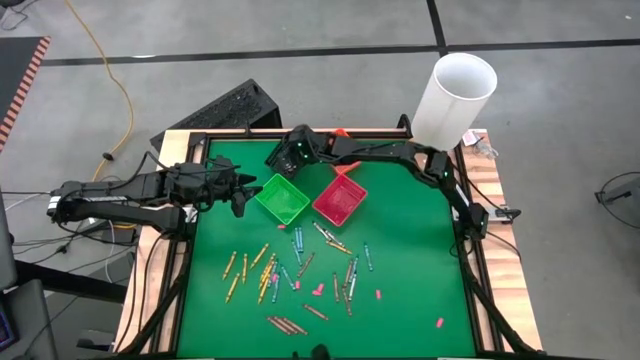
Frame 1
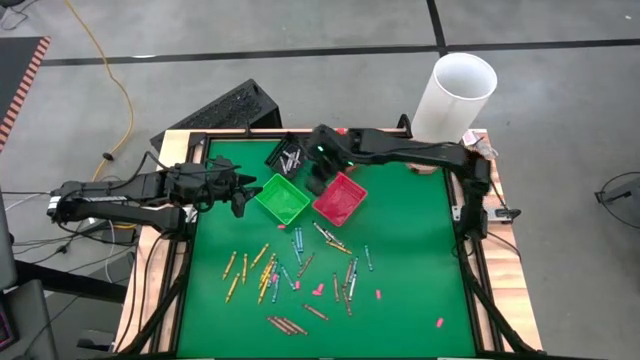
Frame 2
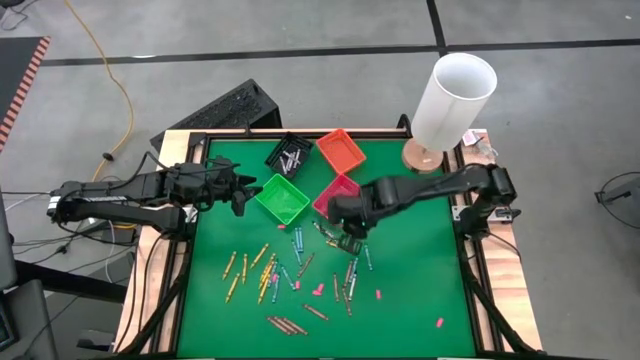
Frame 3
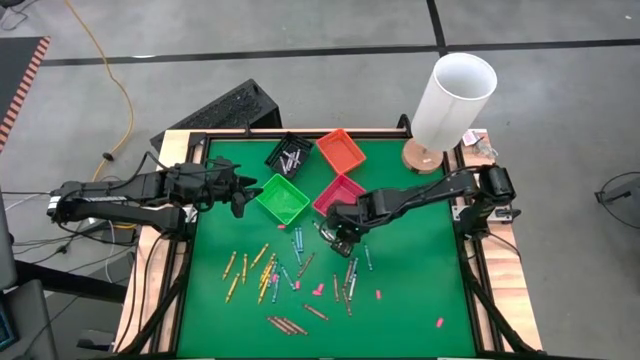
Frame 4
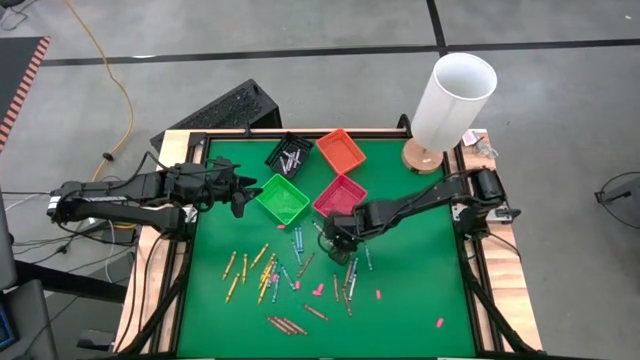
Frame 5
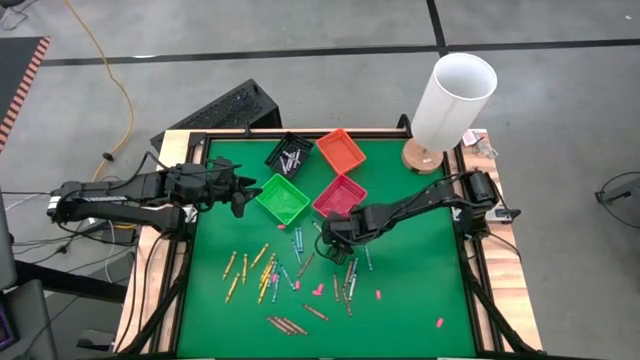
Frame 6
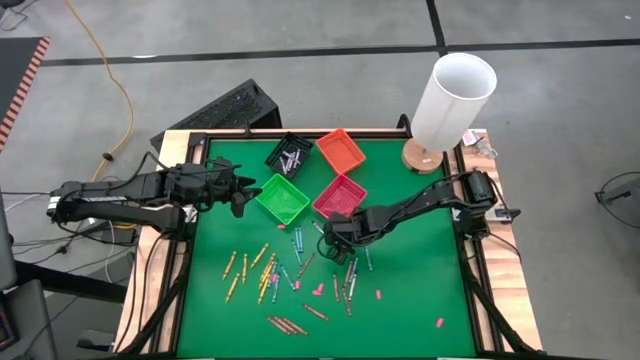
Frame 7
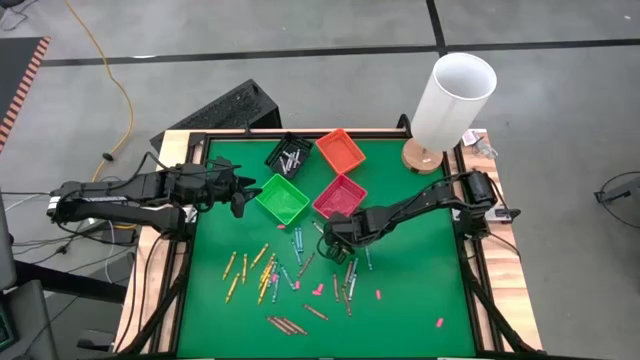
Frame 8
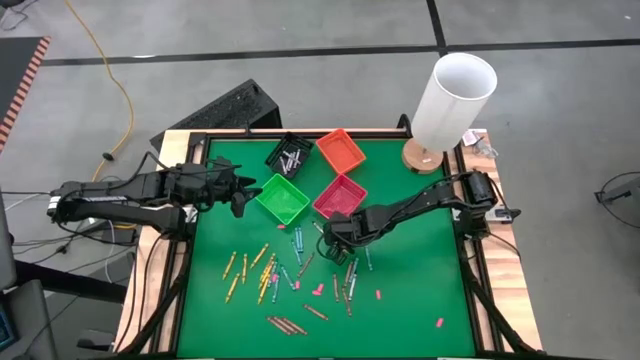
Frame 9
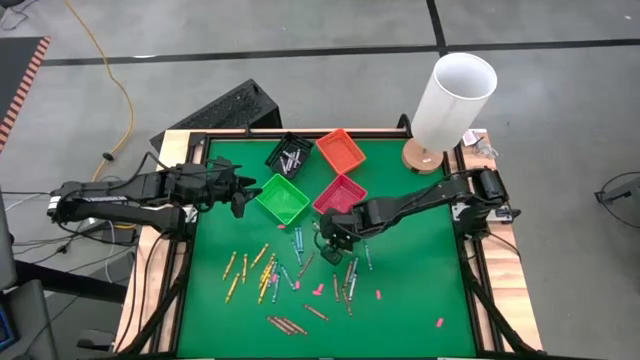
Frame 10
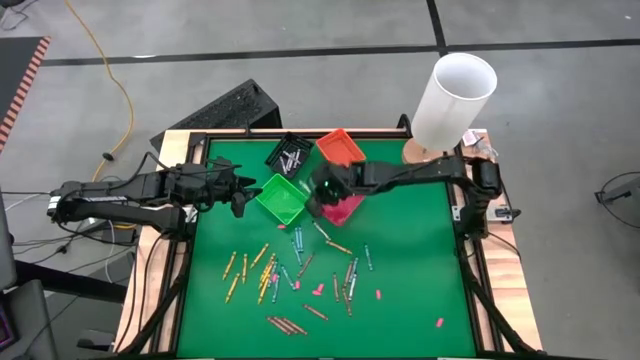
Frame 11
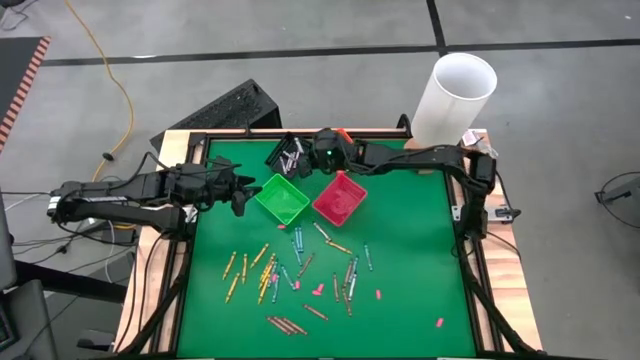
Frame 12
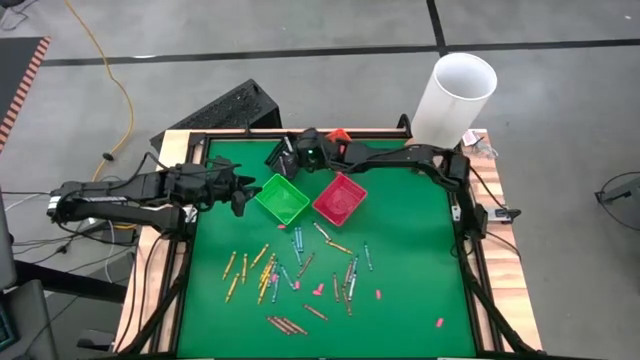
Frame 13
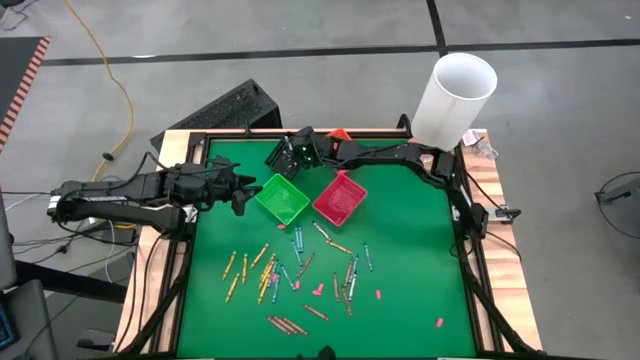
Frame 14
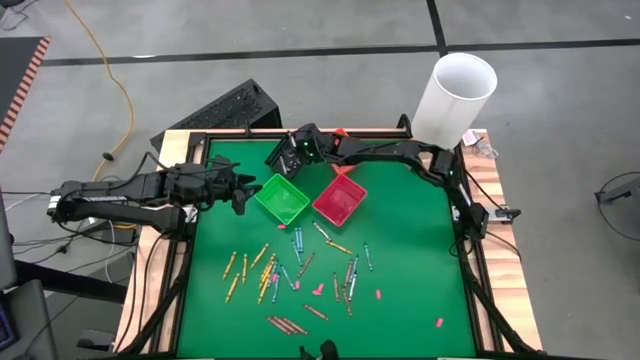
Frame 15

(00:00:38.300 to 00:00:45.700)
Task: Sort crayons
Put the black crayon into the black bin

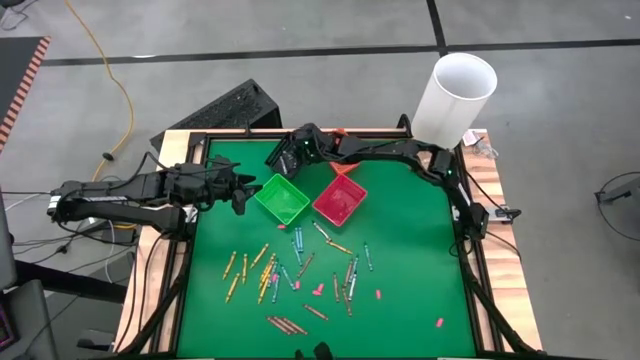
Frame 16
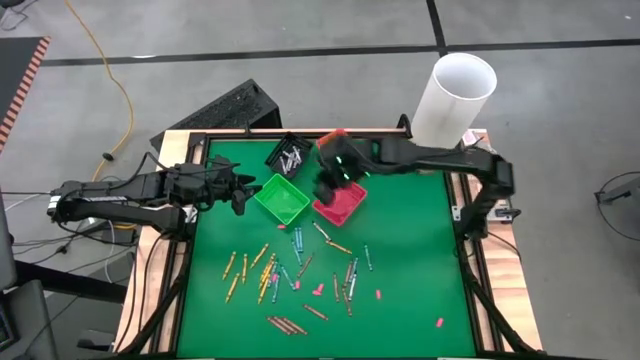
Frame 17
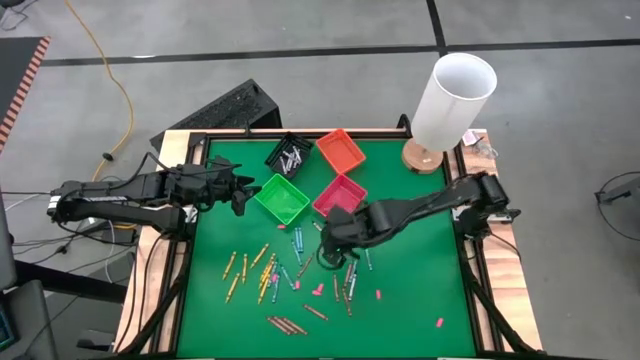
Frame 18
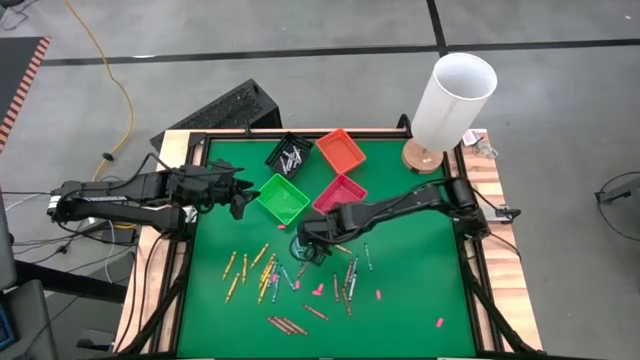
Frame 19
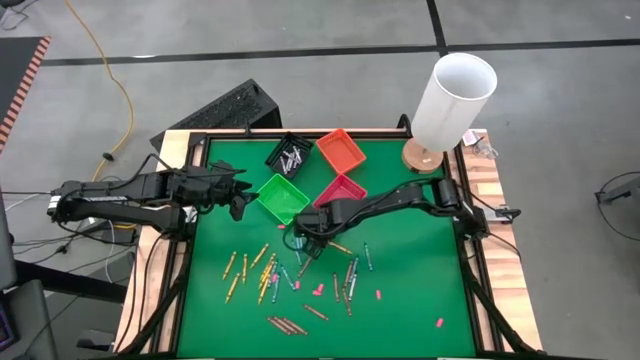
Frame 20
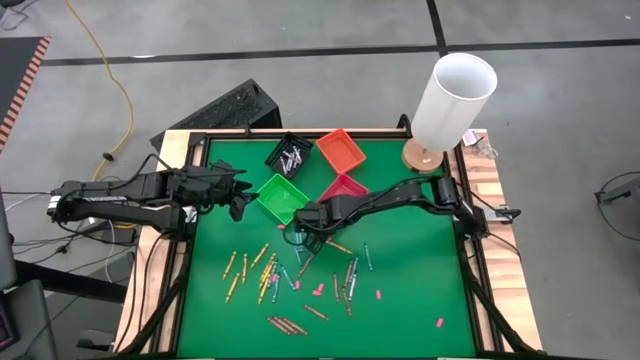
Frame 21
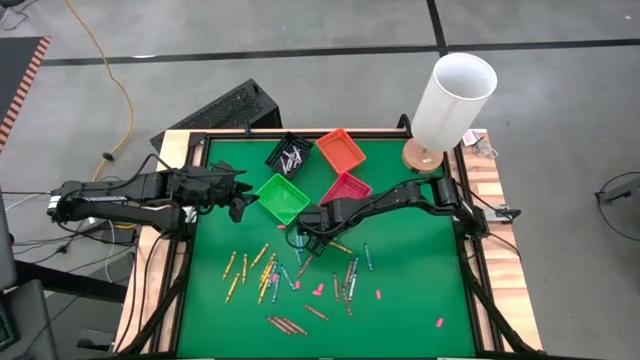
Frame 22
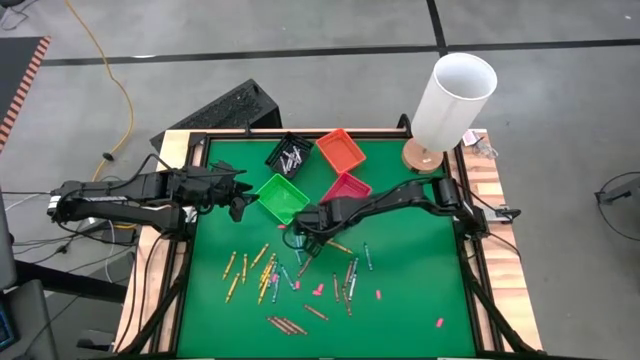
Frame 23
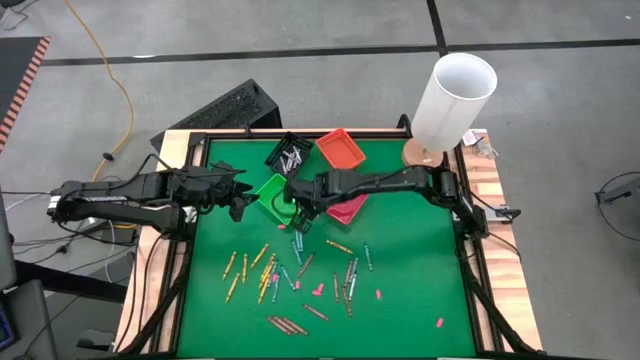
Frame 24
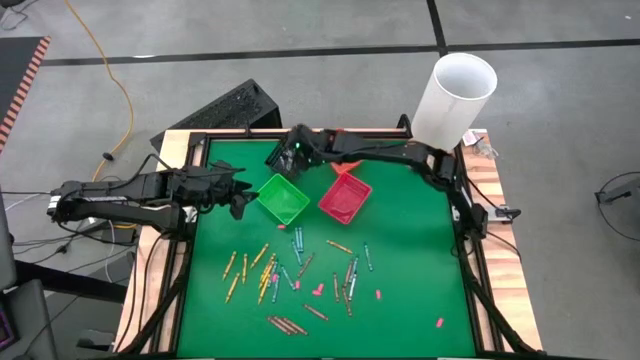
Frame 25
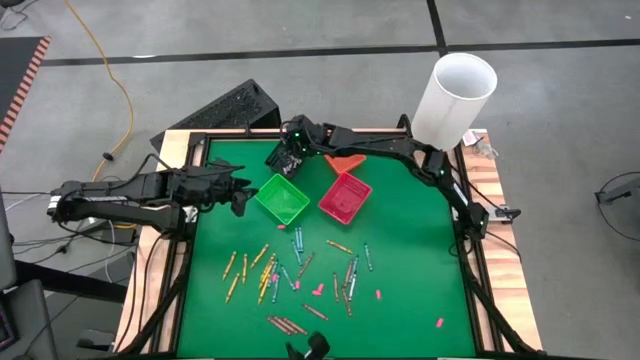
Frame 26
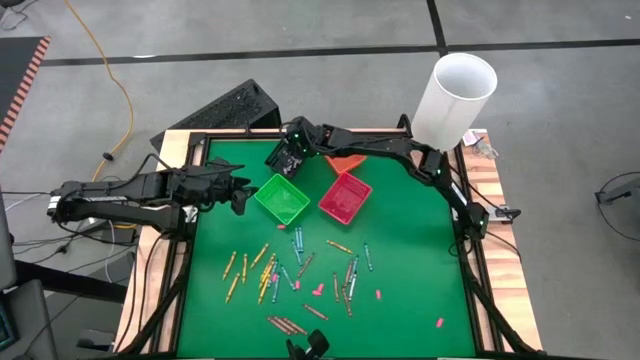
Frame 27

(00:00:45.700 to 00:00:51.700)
Put the black crayon into the black bin

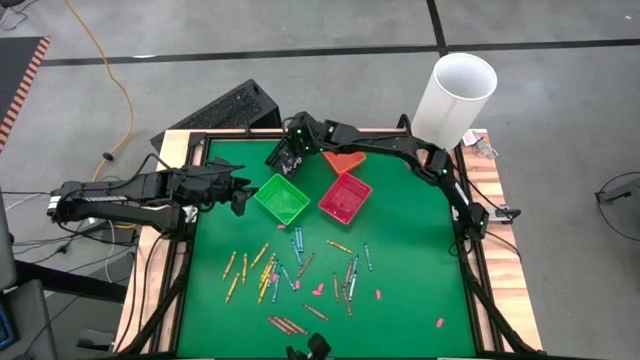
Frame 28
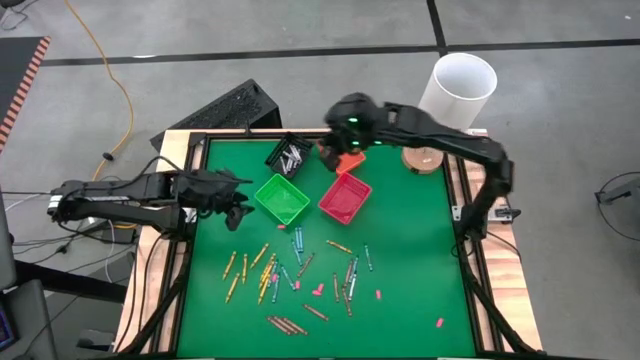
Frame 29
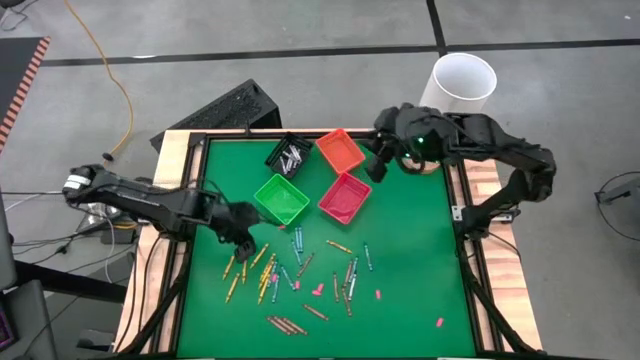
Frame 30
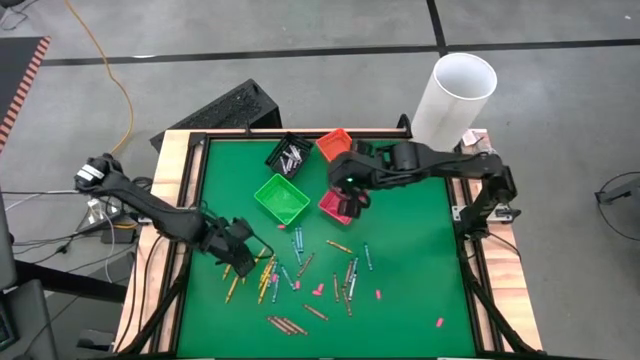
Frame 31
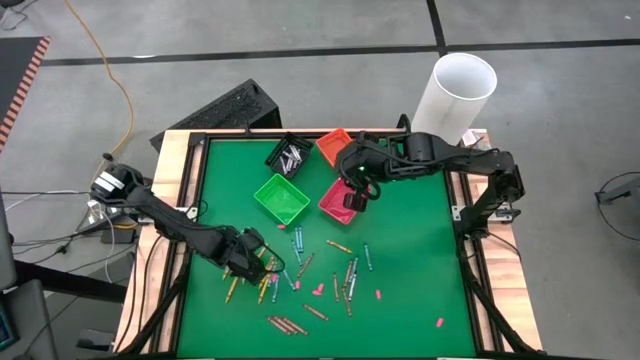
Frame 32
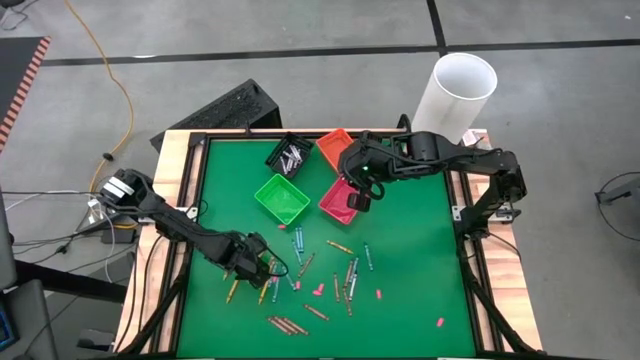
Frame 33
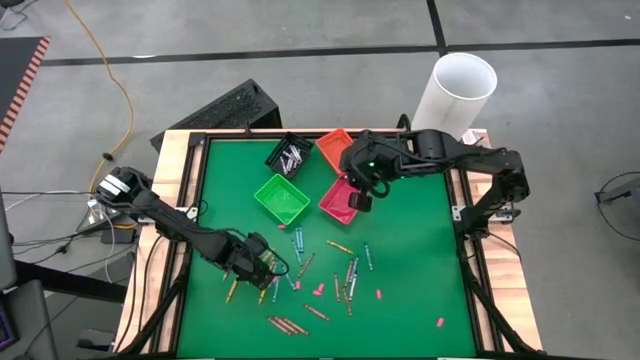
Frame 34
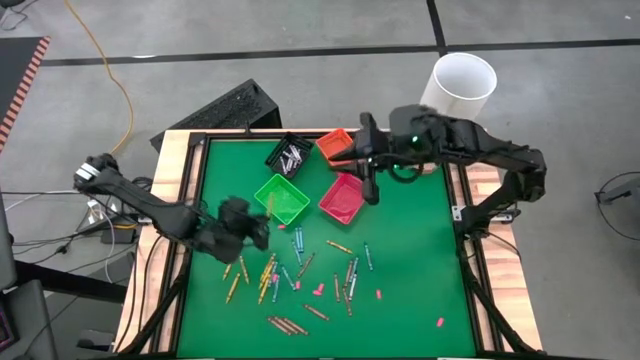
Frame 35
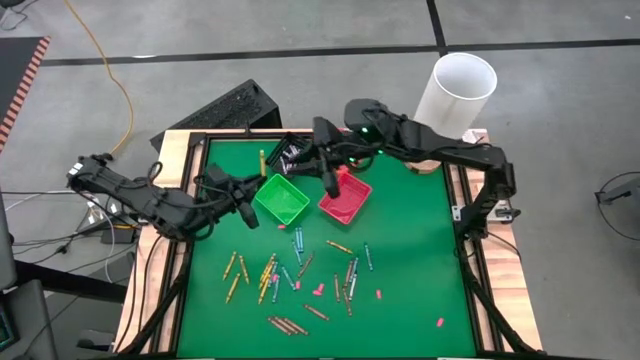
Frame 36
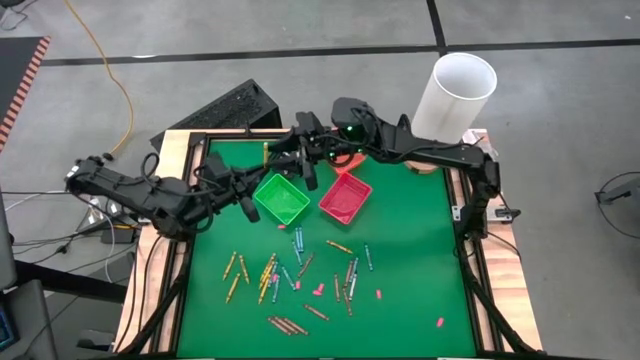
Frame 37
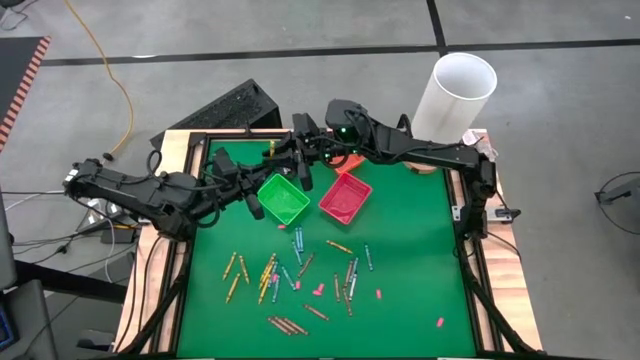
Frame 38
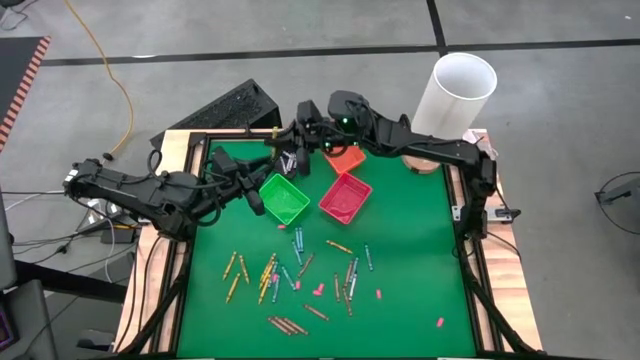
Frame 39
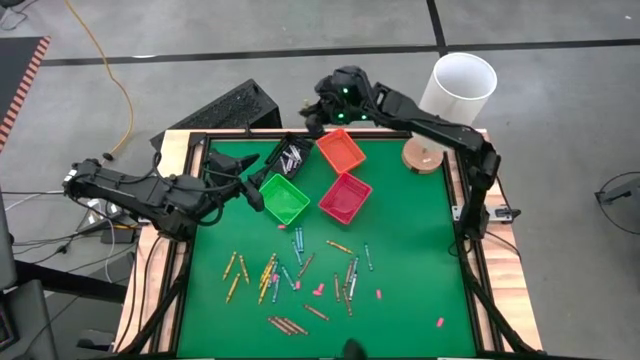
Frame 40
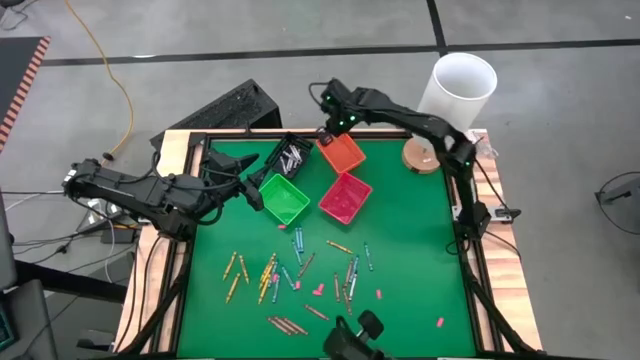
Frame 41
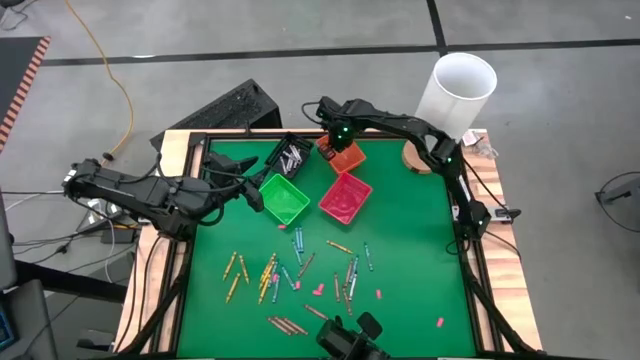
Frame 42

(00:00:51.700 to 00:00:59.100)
Put the yellow crayon into the bin
